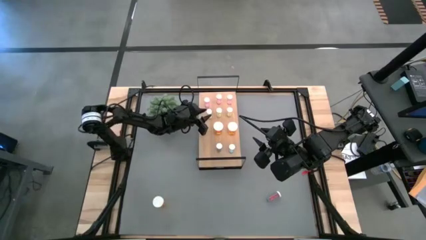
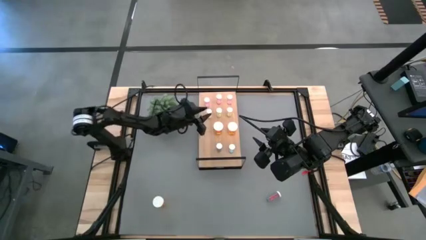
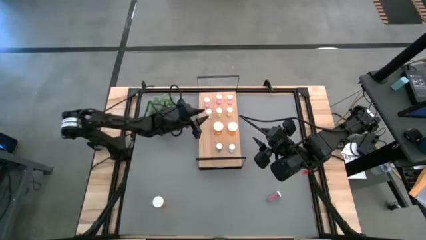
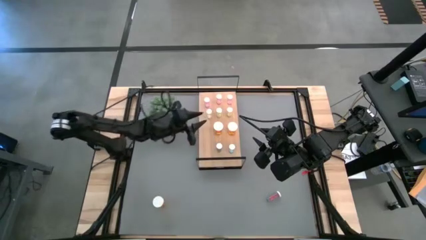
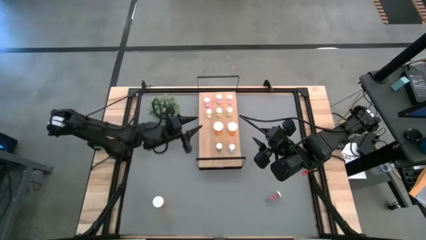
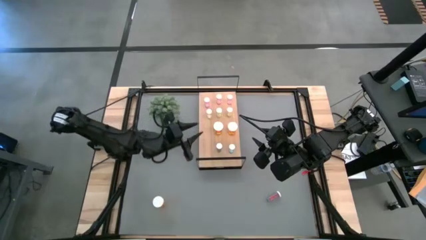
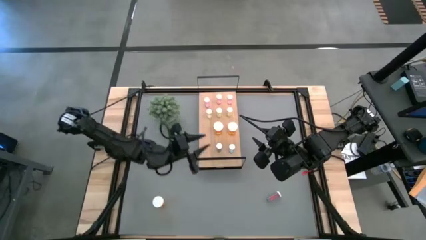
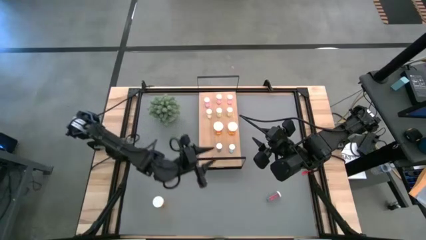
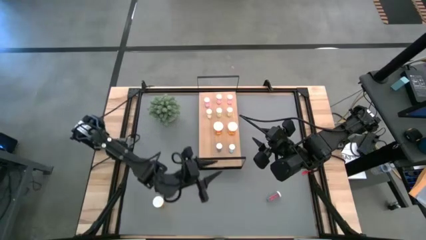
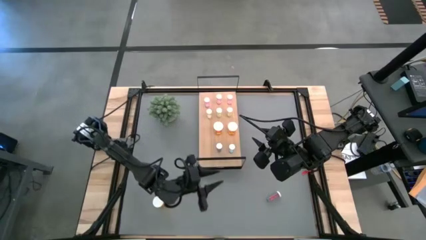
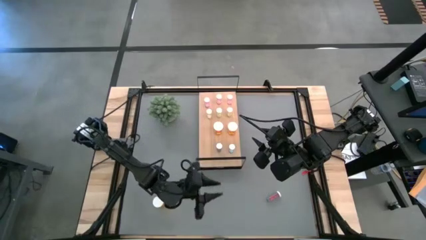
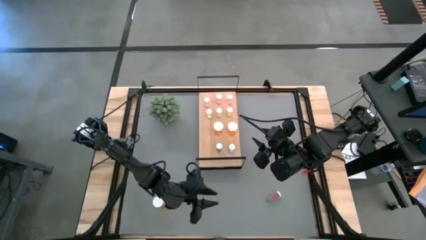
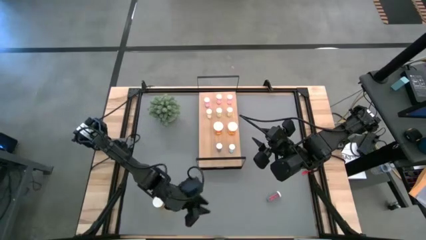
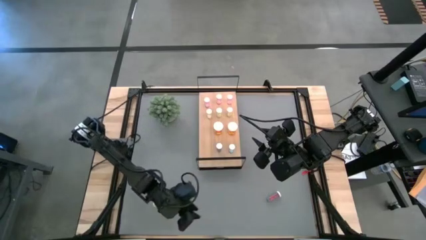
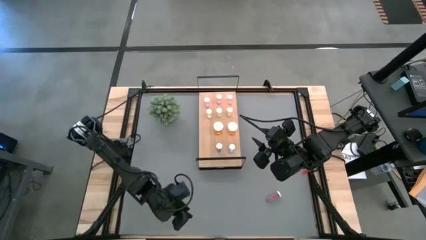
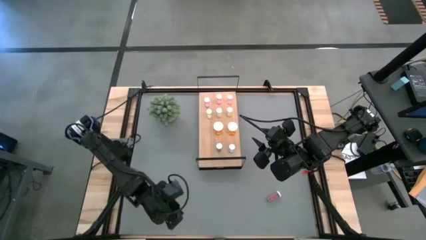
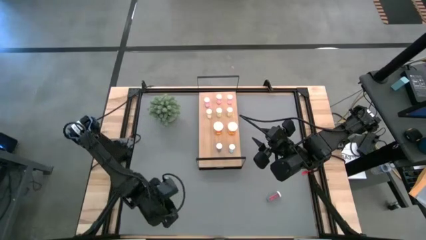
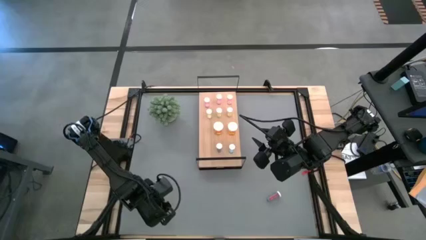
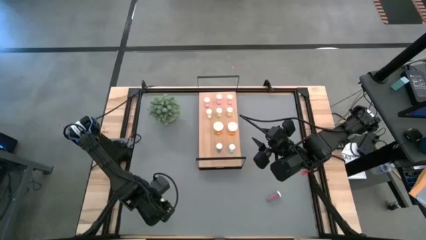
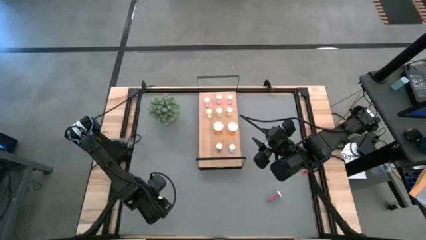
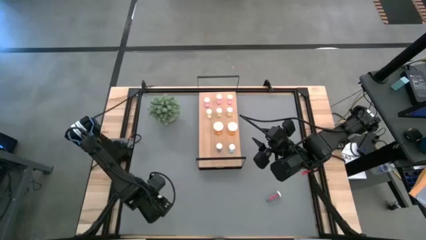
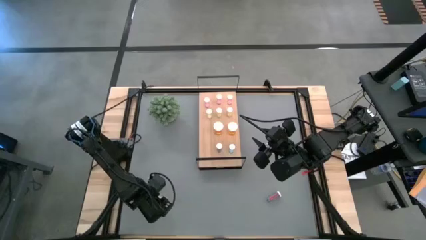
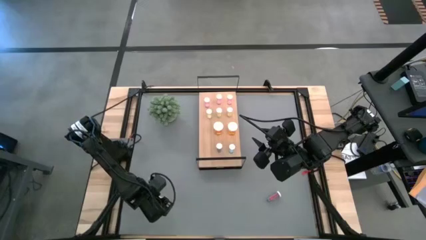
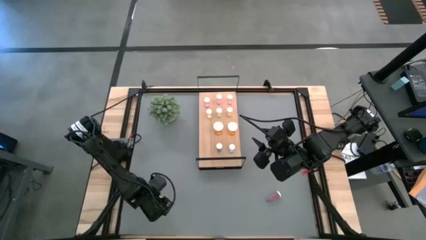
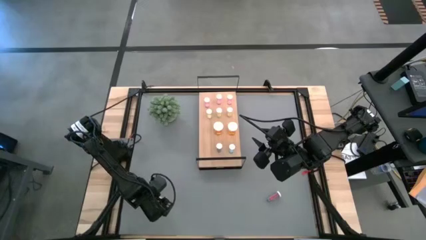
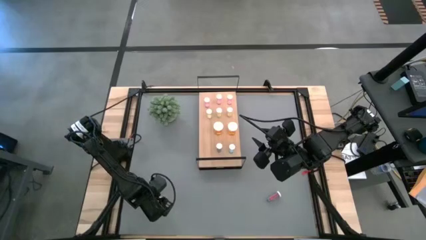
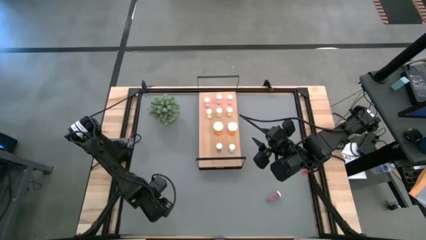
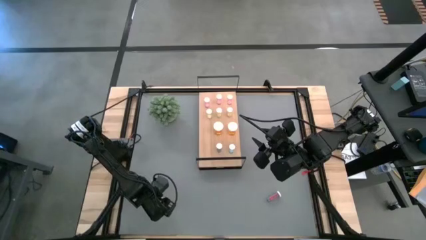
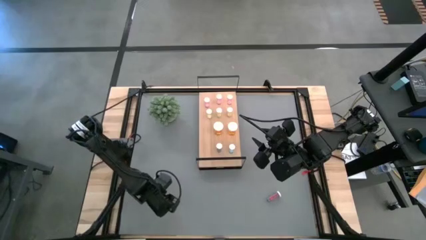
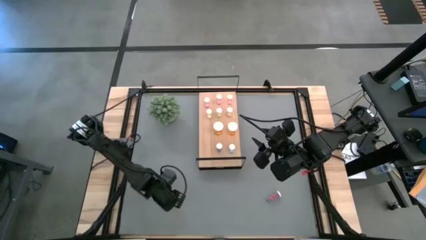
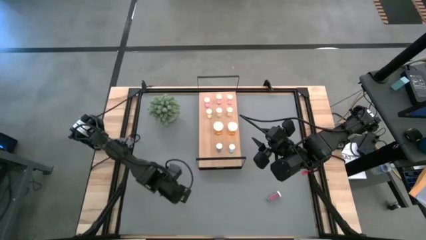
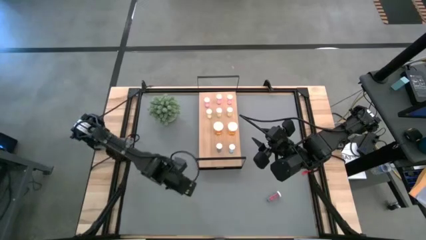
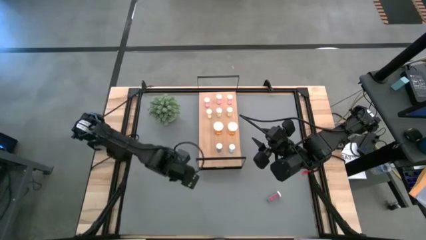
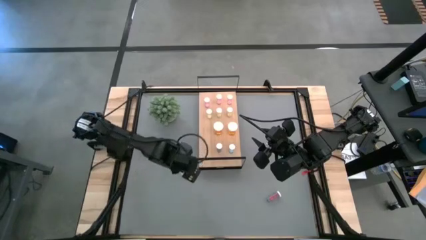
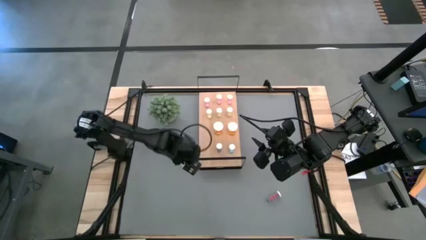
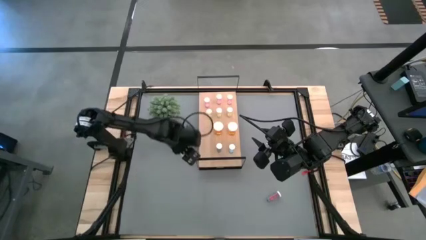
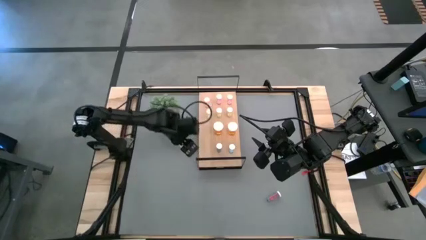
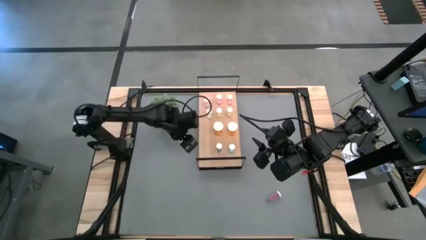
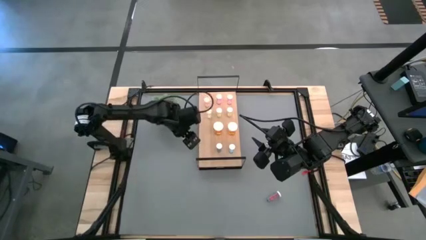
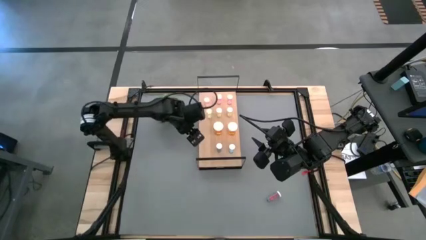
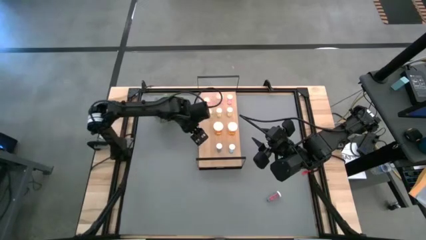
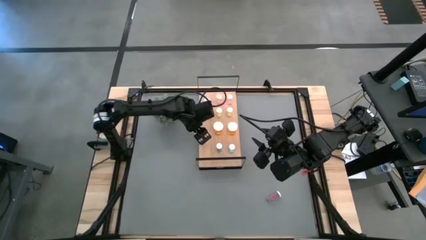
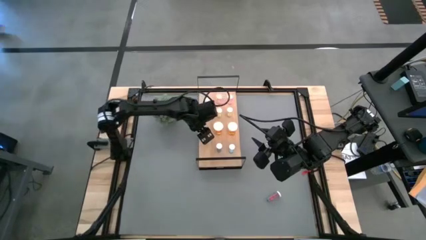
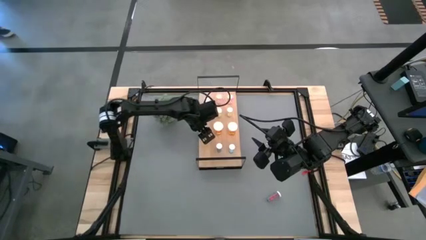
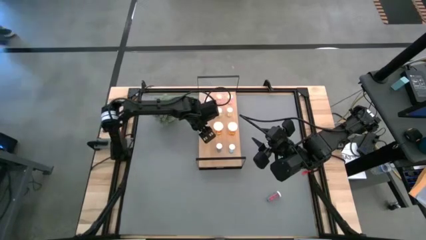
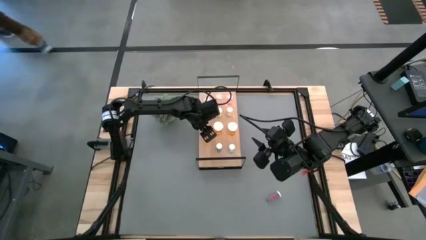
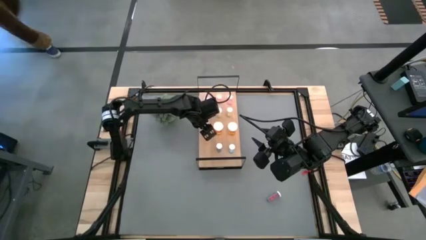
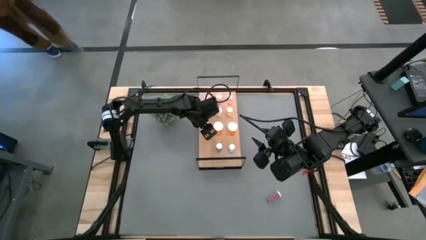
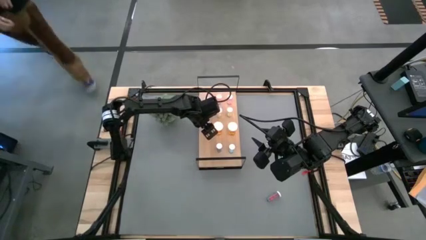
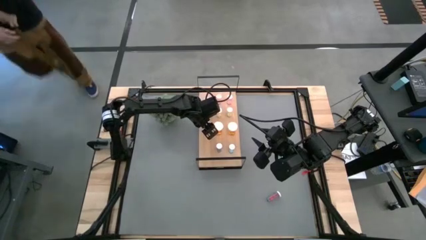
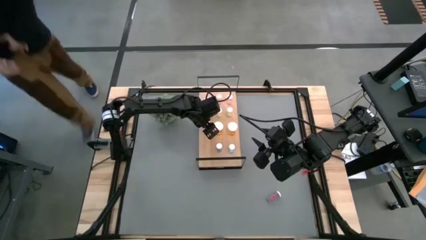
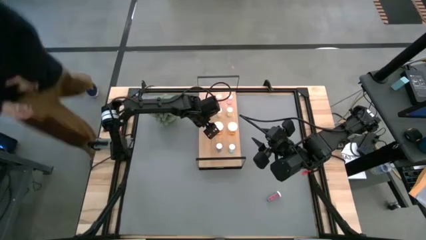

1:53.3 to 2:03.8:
Task: Pick and place medicine bottles onto shelf by color
Put the orange pill bottle aligned with the other orange pill bottles on the shelf

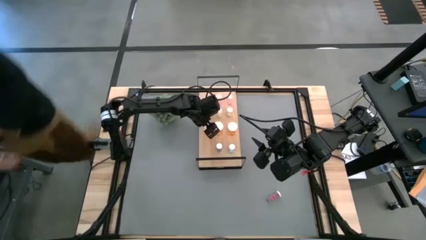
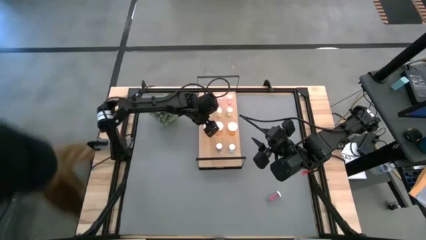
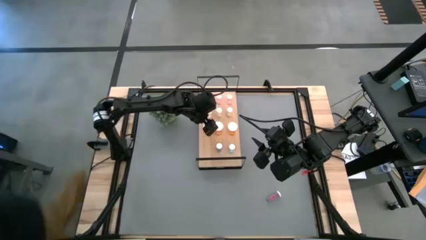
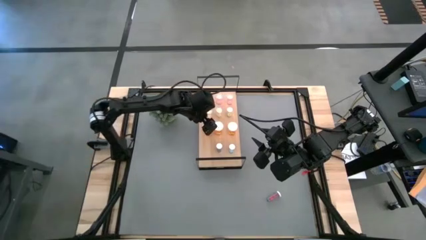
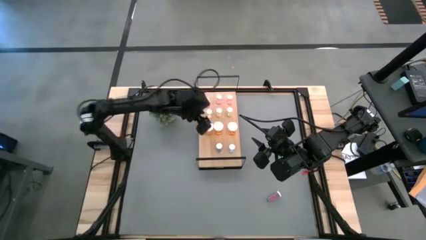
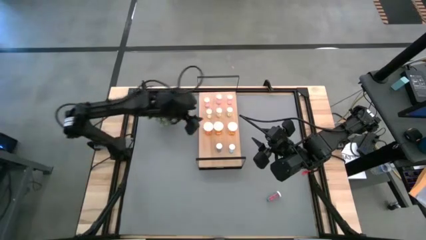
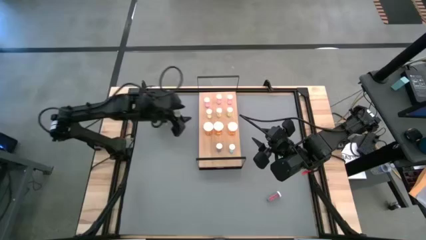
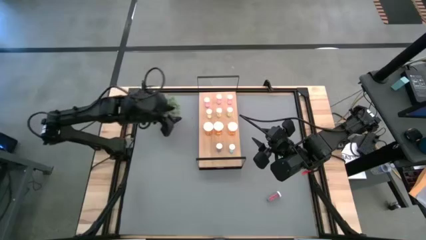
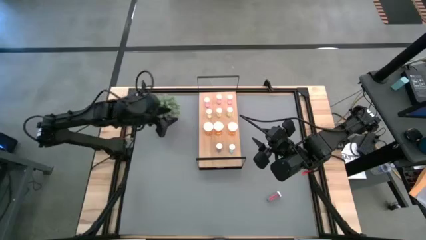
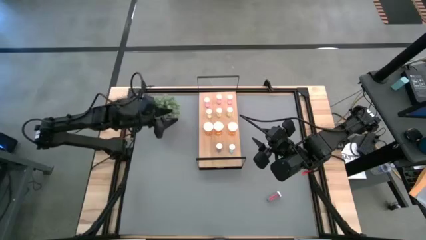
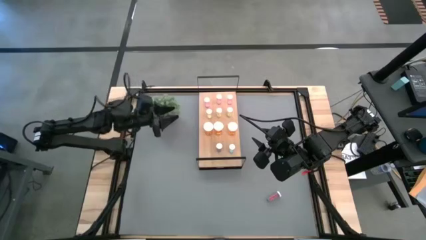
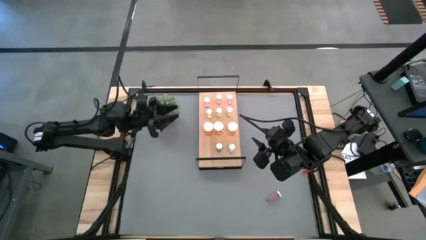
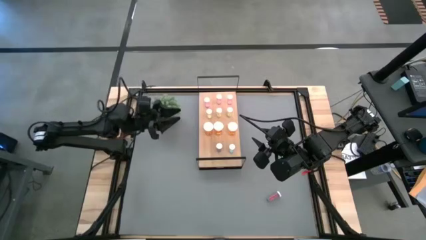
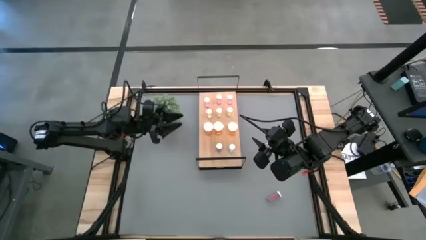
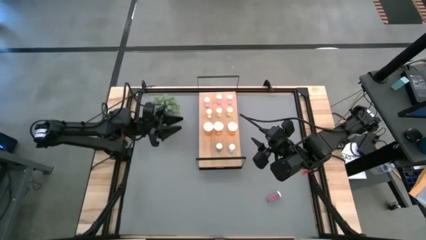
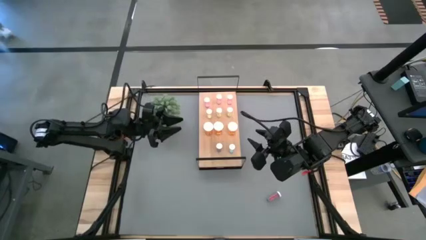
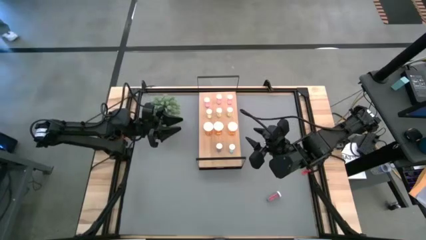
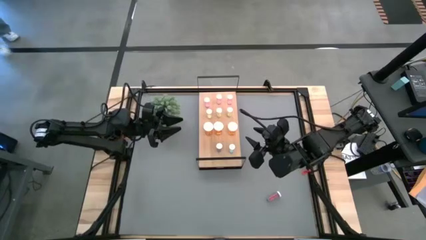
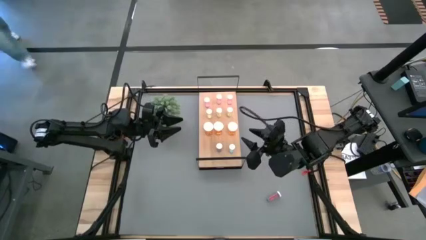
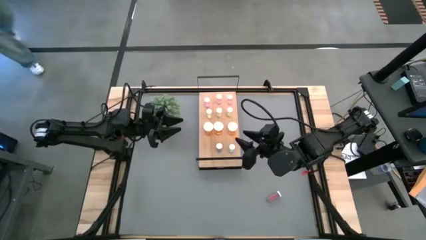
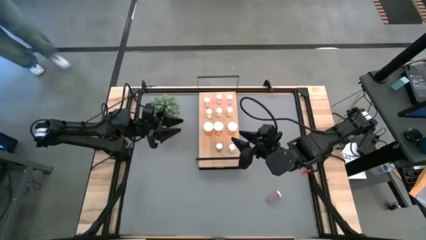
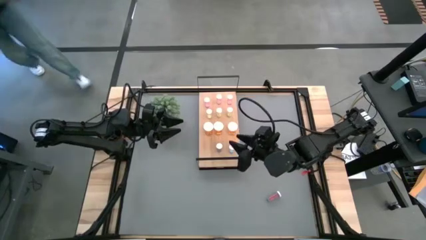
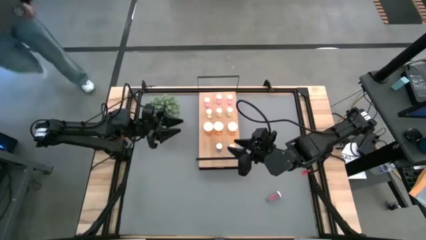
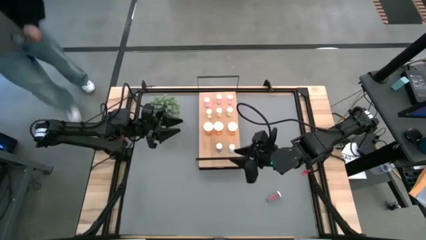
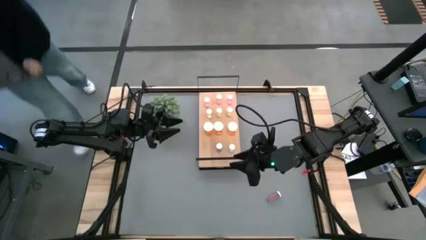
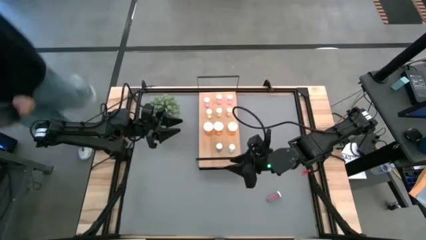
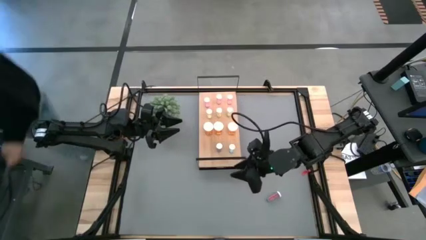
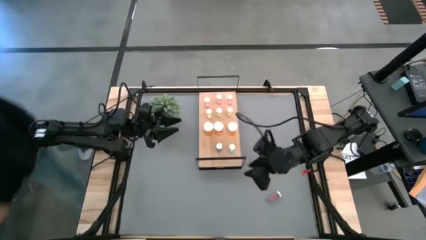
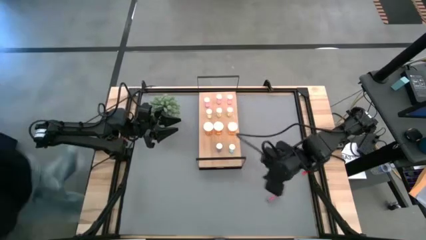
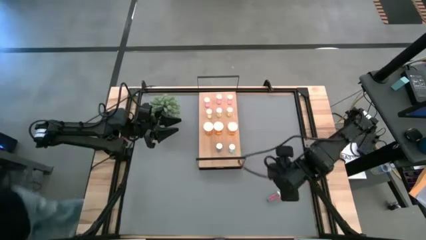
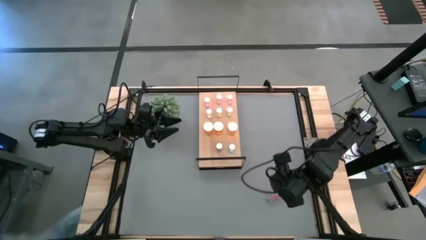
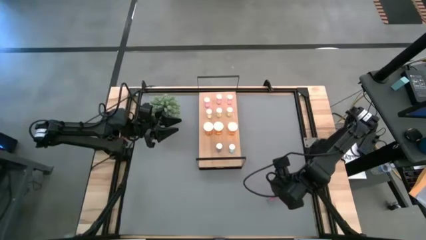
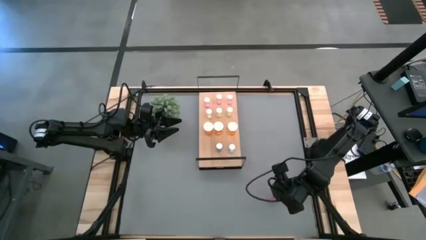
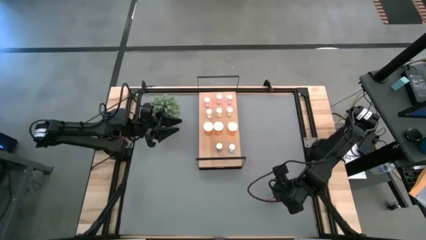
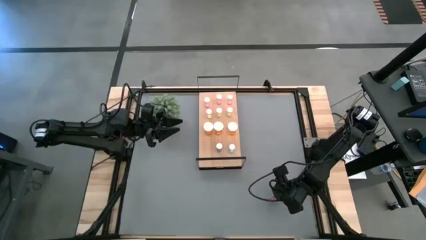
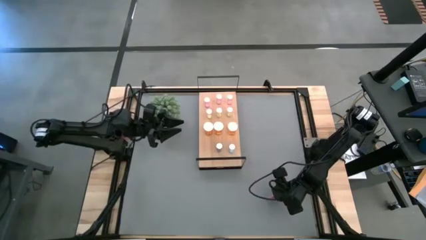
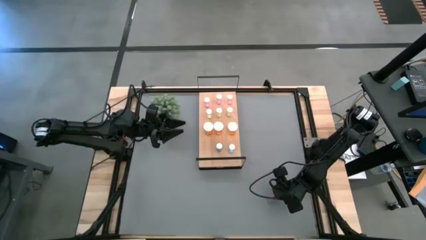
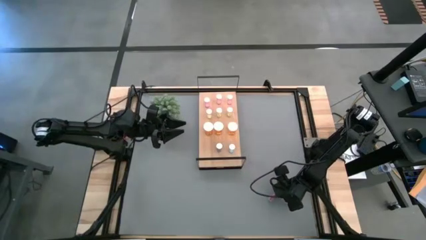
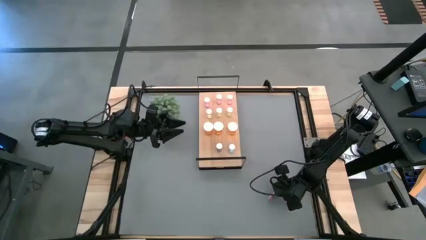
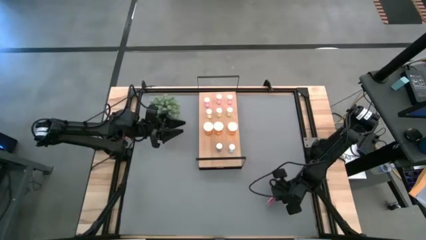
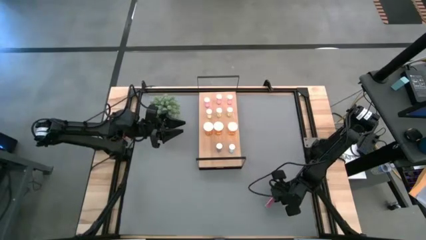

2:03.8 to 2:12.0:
Put the blue pill bottle aligned with the other blue pill bottles on the shelf
